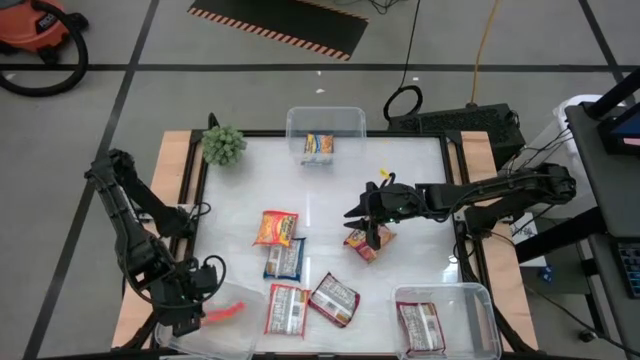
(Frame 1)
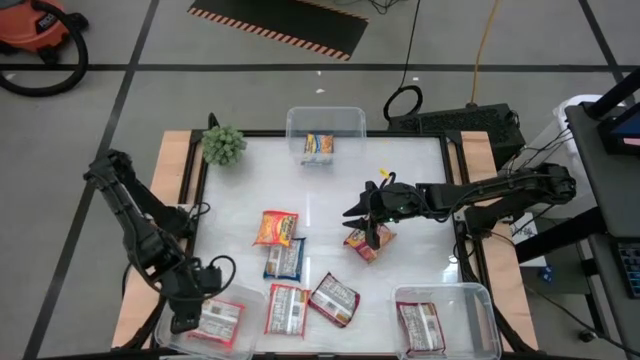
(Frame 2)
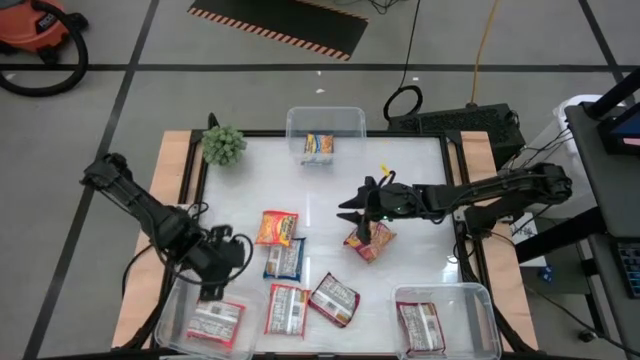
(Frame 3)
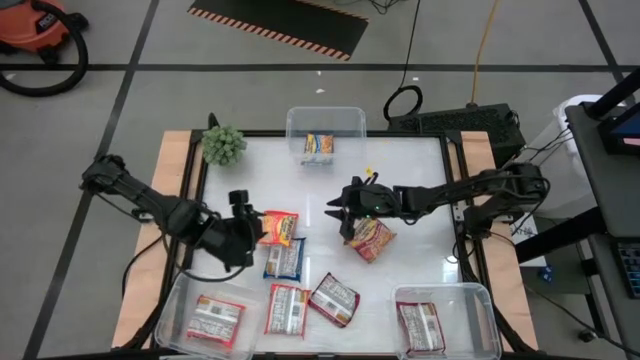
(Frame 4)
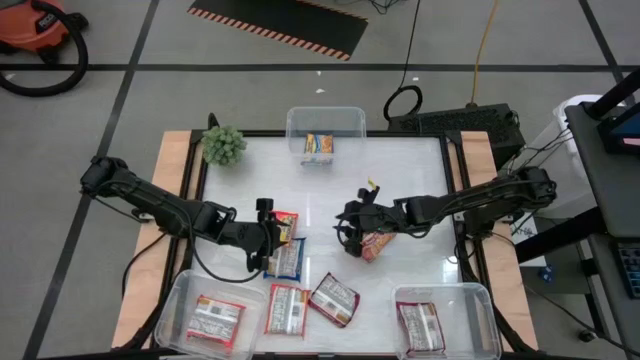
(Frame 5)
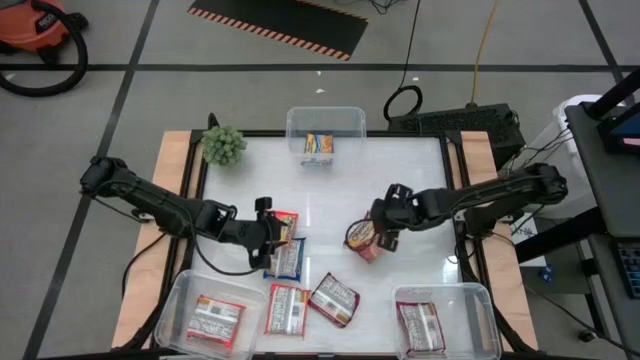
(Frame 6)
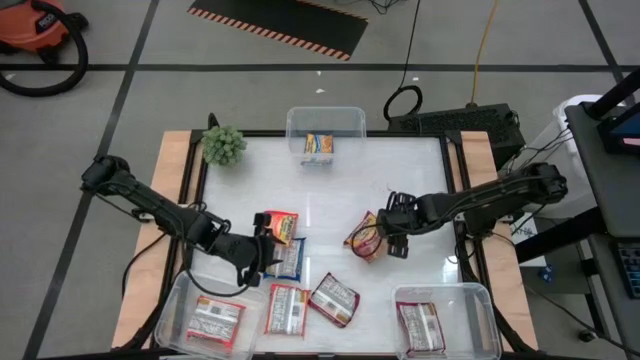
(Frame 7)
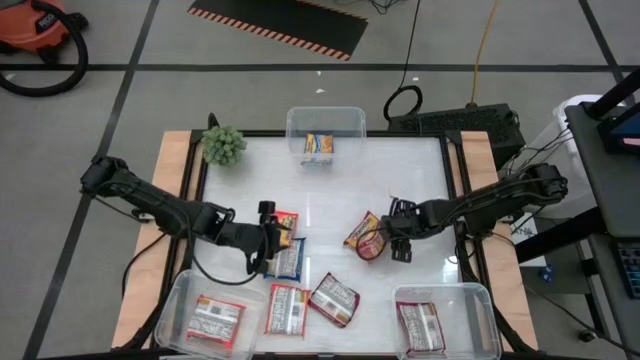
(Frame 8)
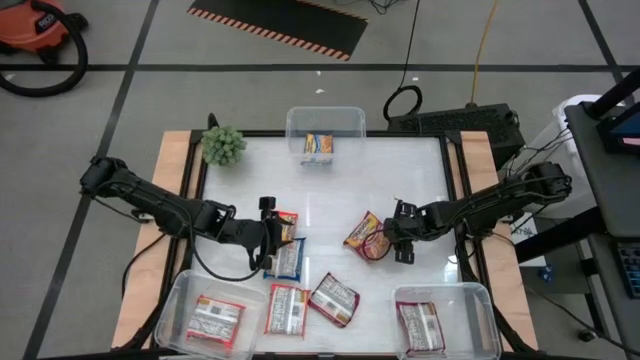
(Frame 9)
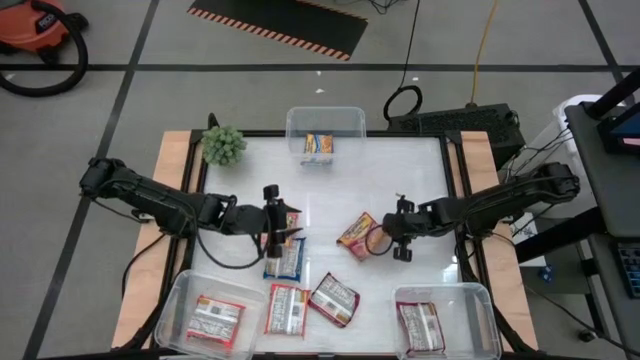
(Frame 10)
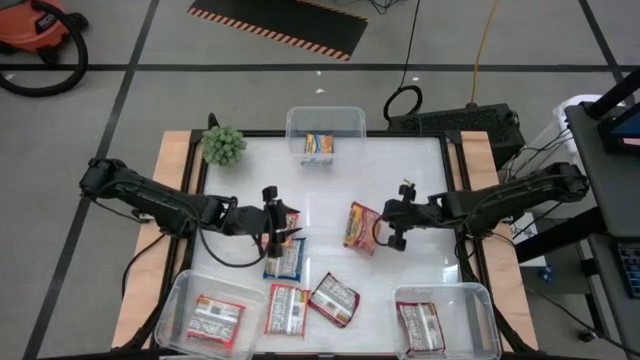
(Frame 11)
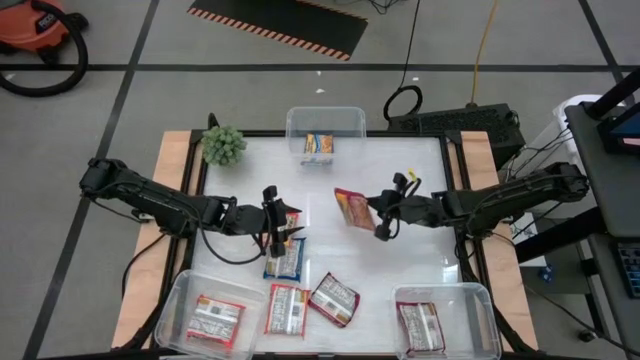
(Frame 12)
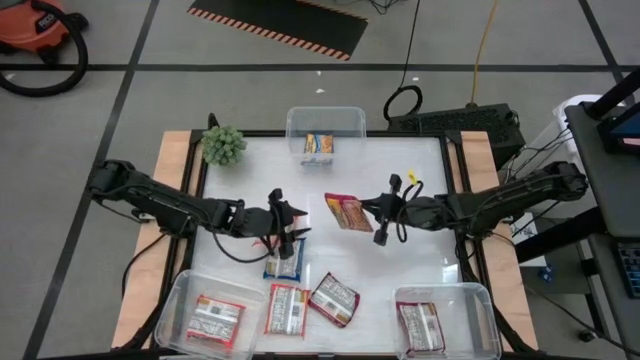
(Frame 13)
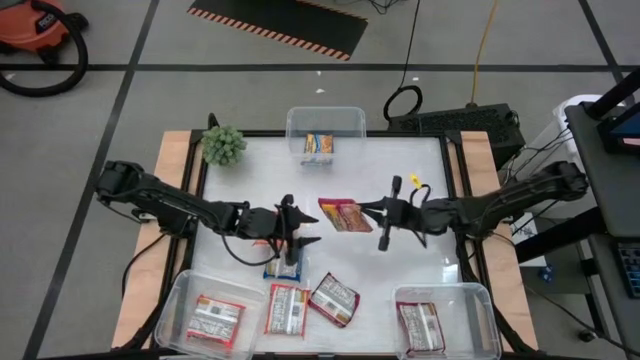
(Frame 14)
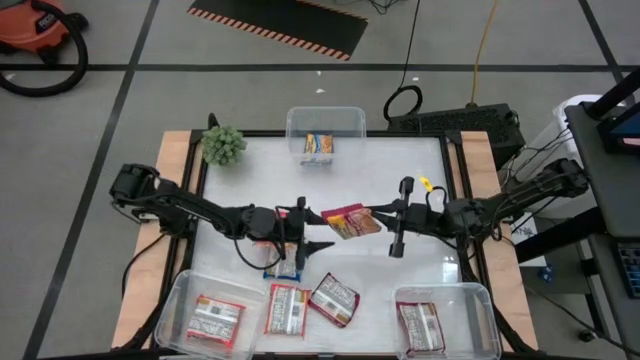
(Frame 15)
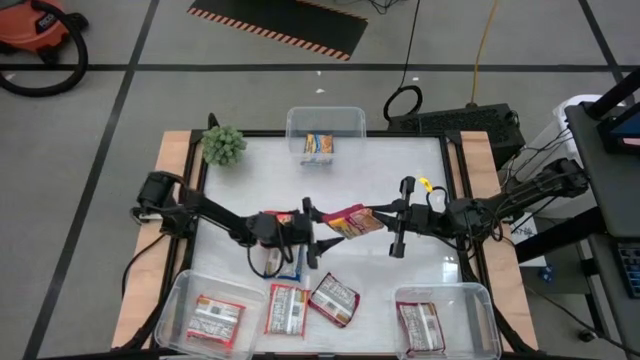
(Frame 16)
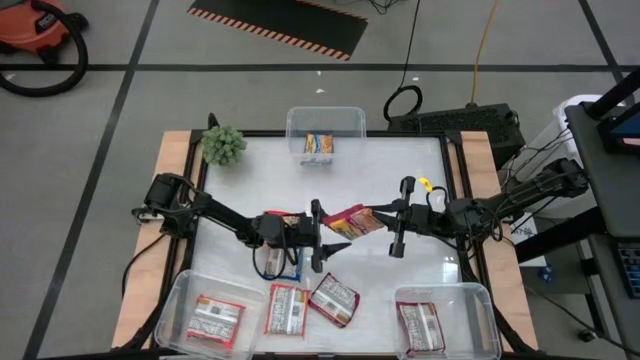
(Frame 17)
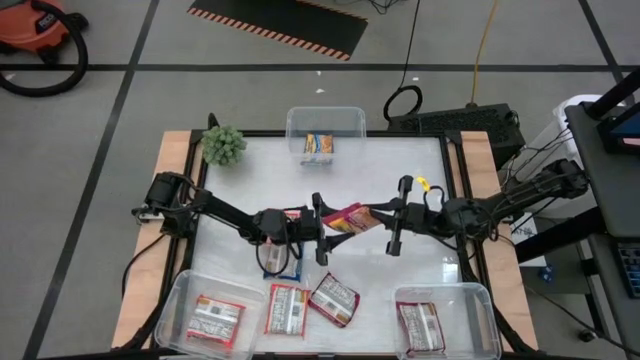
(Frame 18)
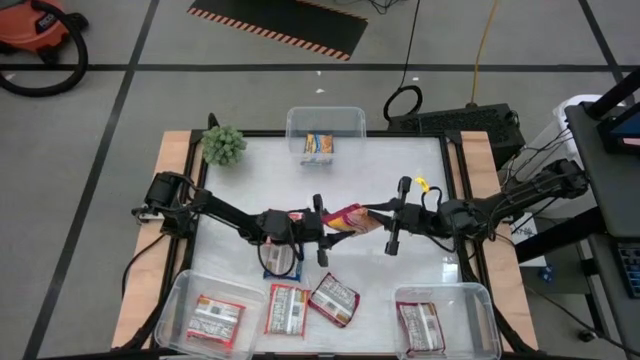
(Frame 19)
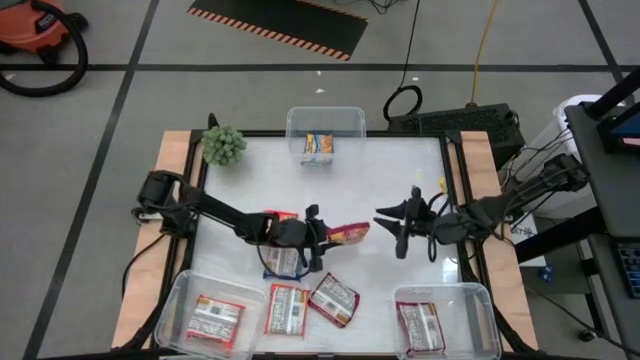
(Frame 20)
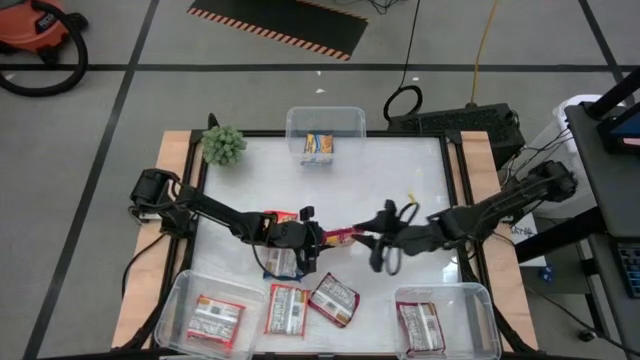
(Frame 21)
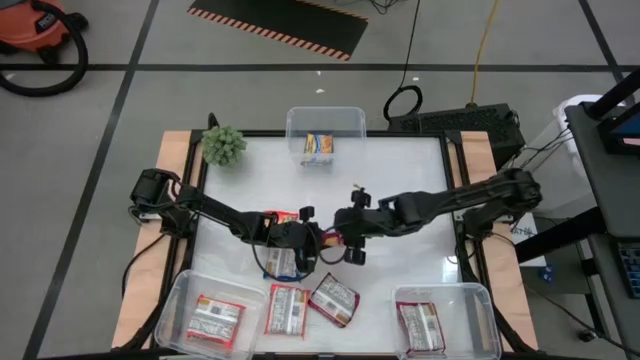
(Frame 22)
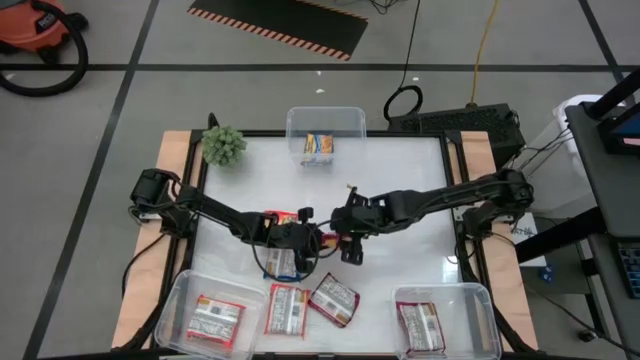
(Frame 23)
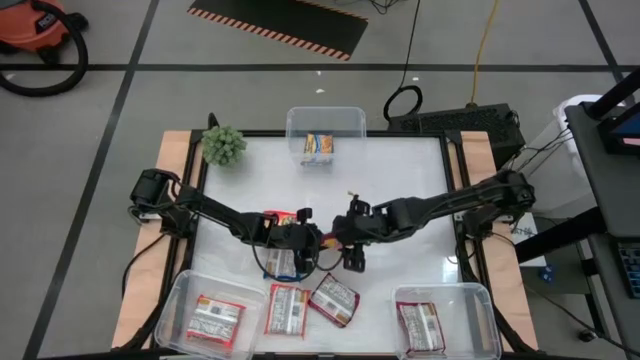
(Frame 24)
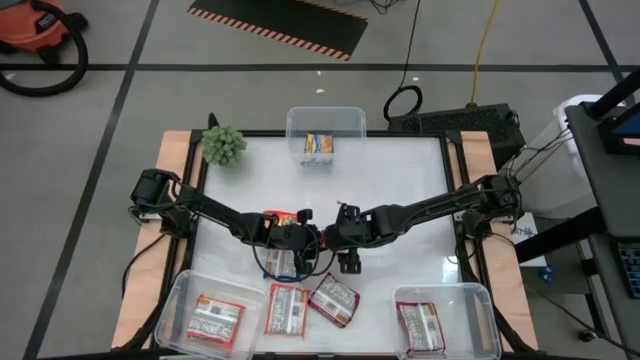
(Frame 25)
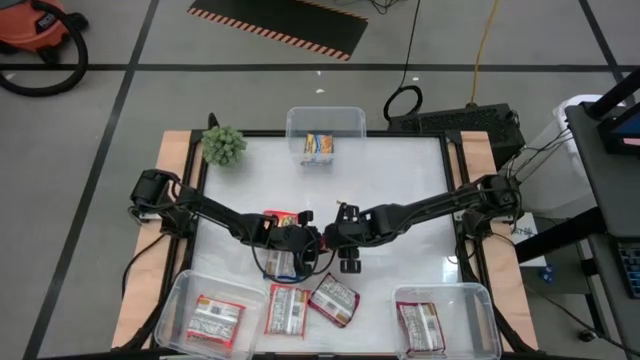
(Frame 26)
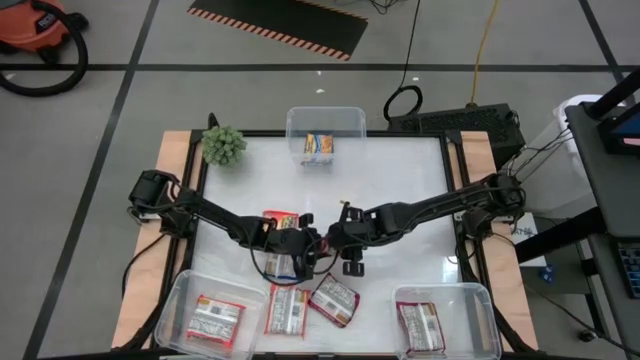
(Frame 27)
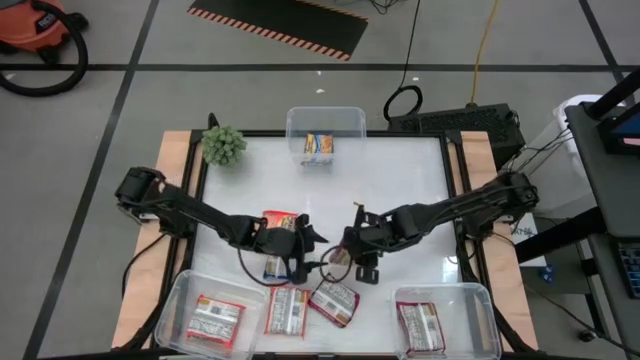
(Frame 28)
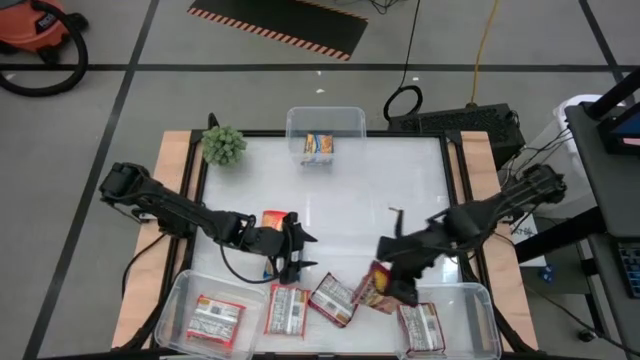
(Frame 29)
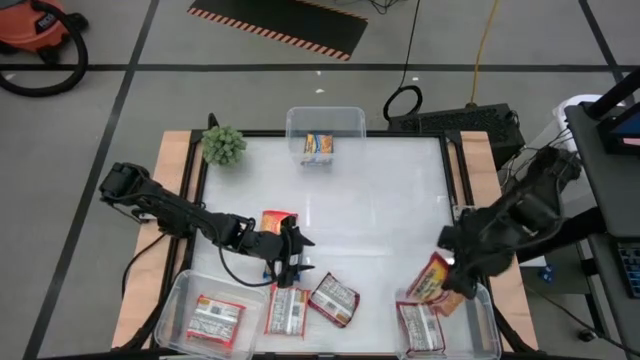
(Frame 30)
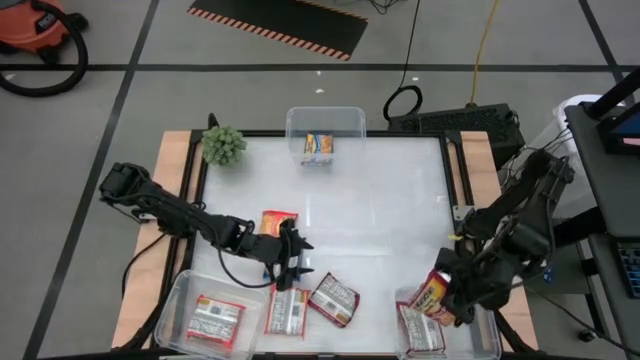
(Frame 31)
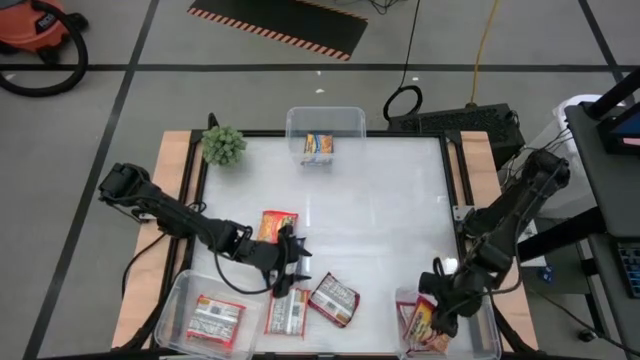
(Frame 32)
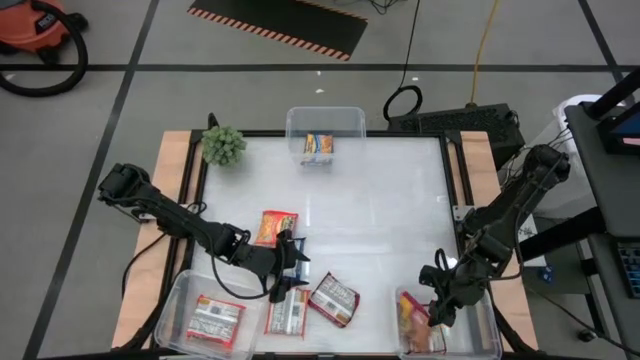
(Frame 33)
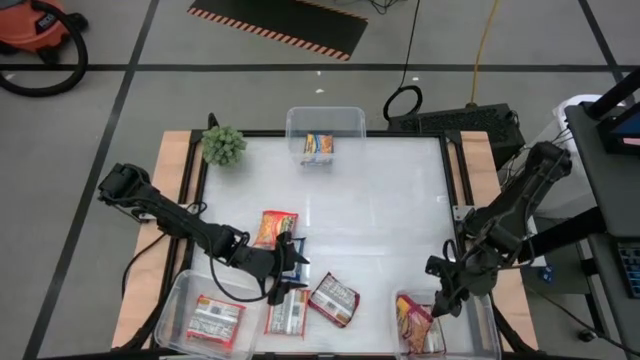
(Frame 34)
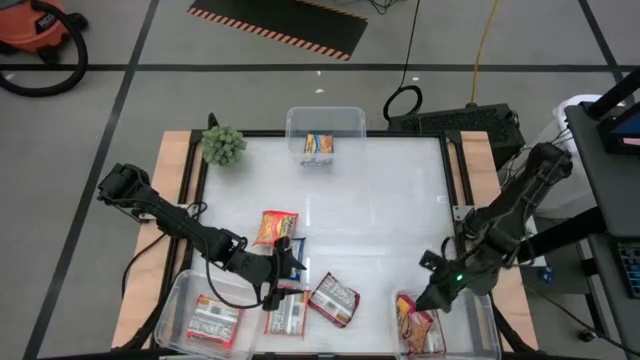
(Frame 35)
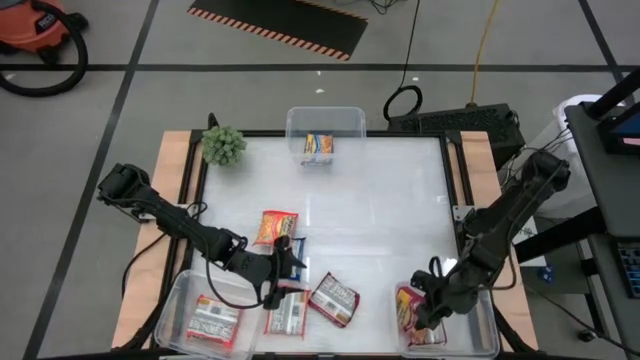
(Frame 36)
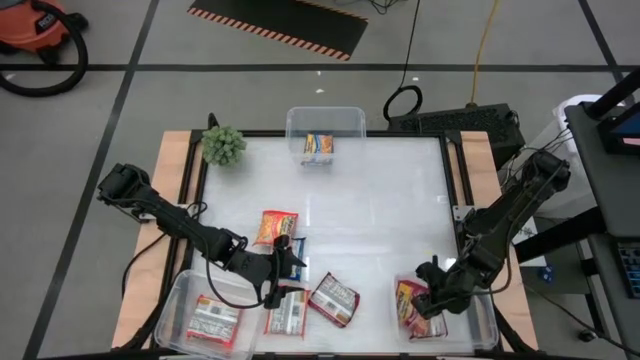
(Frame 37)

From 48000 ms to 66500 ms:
Task: Sort Maruchan noodles
Put the top red noodle pack into the right transparent bin

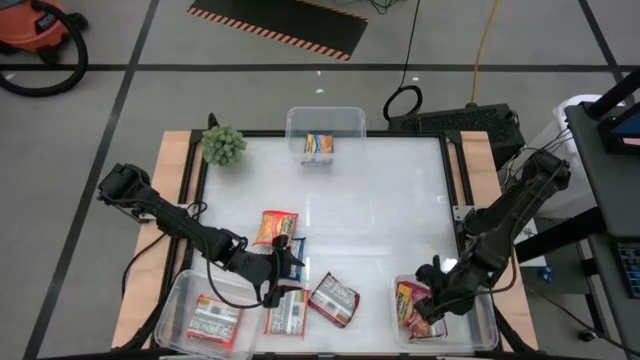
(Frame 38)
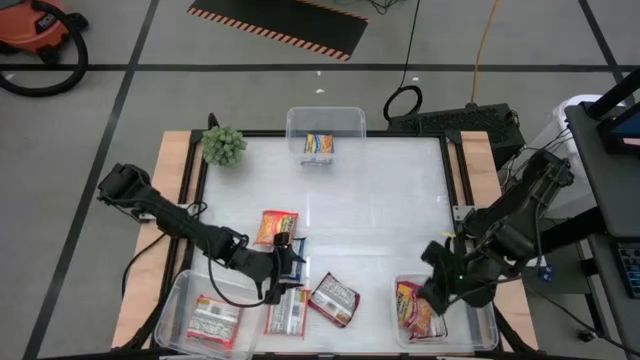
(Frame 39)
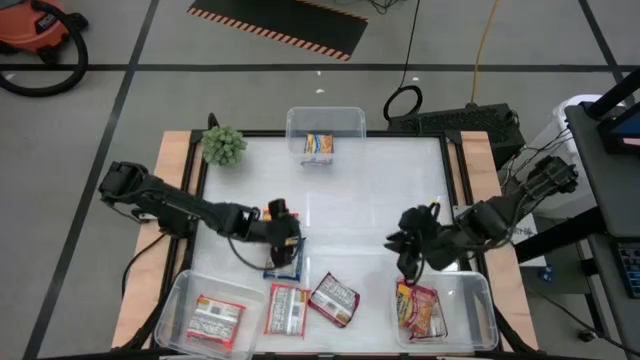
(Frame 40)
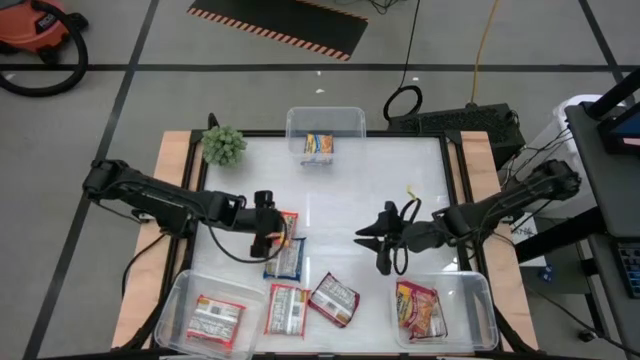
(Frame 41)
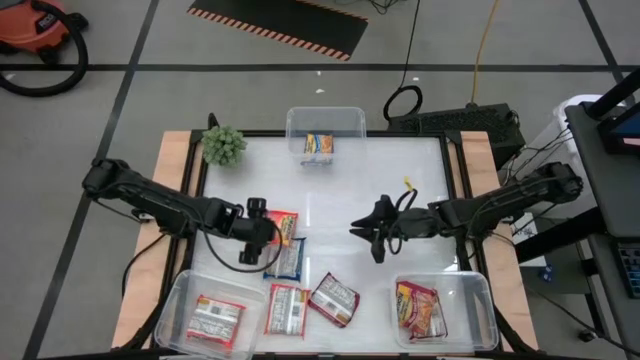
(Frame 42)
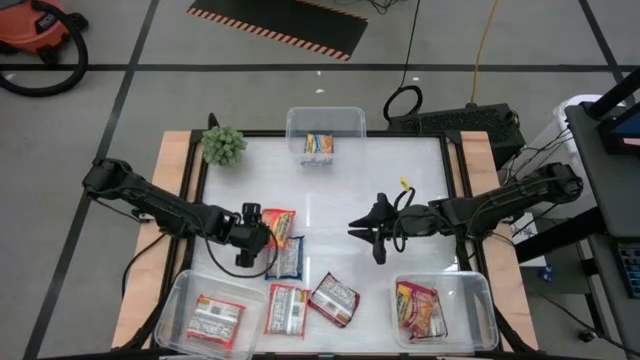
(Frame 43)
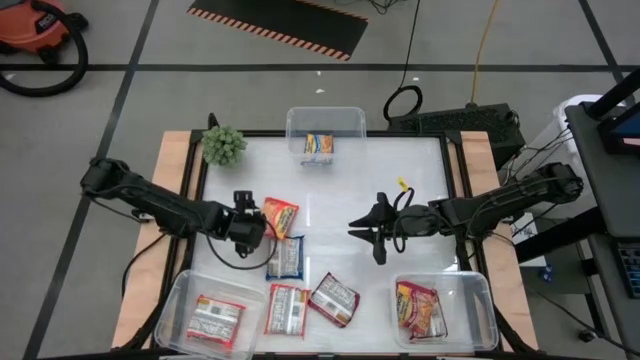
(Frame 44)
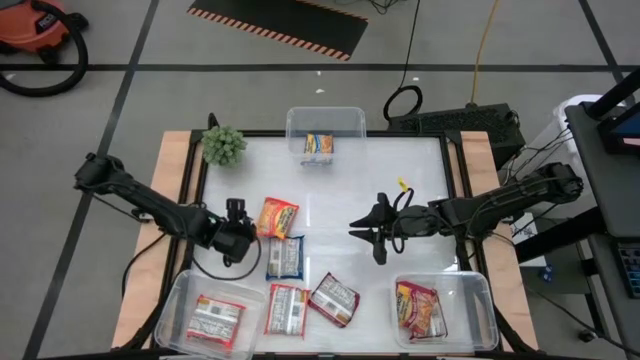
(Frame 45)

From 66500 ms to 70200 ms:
Put the top orange noodle pack into the left transparent bin
